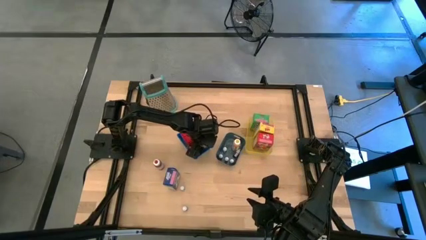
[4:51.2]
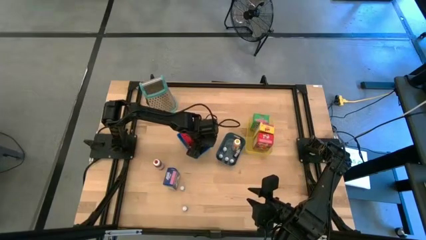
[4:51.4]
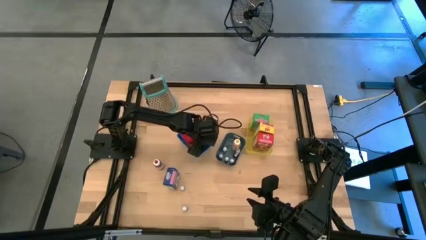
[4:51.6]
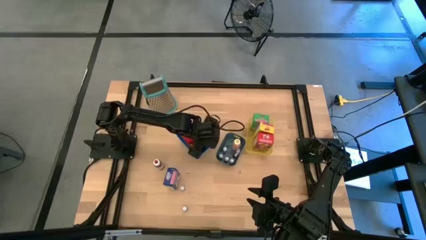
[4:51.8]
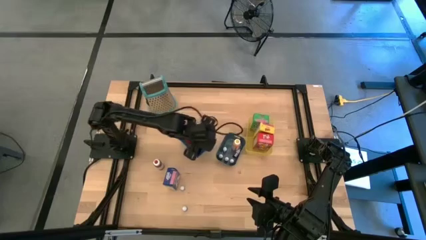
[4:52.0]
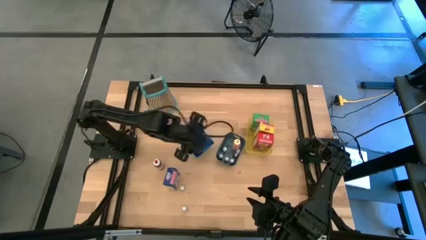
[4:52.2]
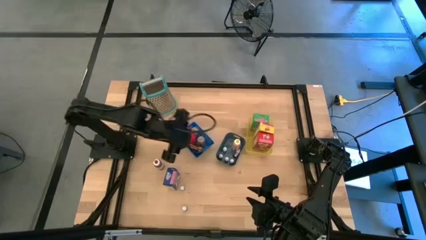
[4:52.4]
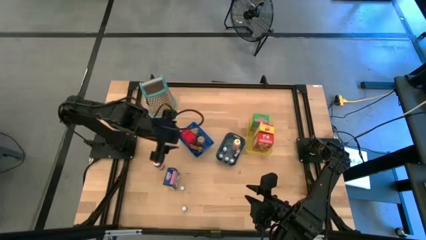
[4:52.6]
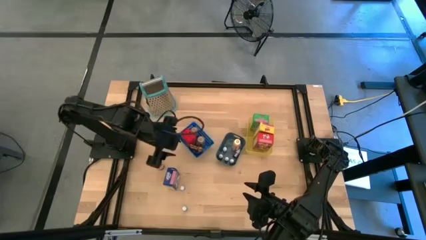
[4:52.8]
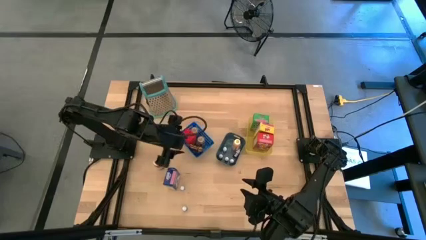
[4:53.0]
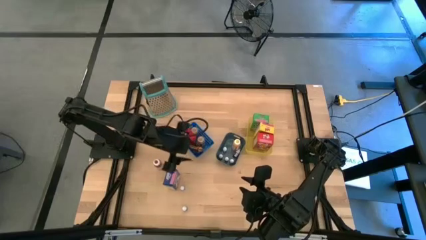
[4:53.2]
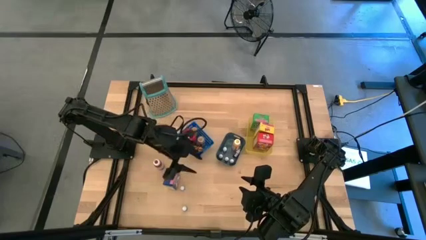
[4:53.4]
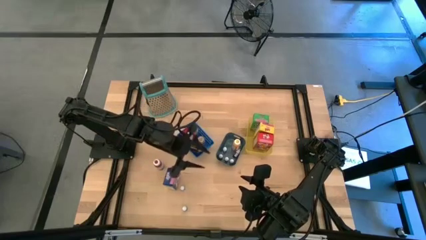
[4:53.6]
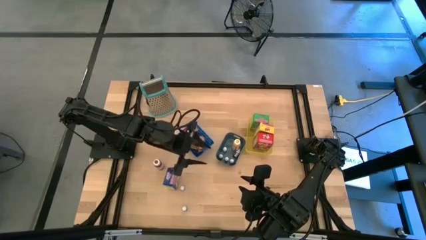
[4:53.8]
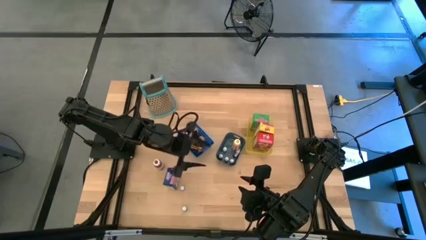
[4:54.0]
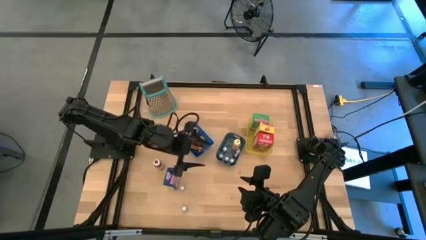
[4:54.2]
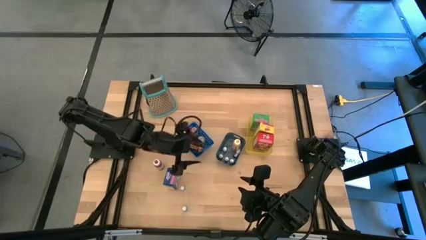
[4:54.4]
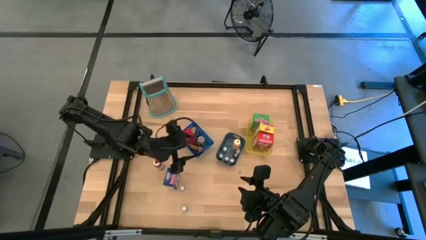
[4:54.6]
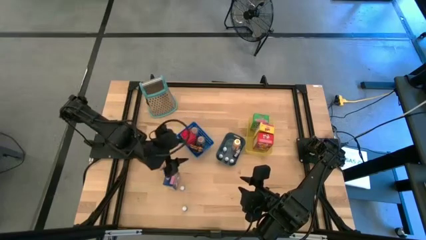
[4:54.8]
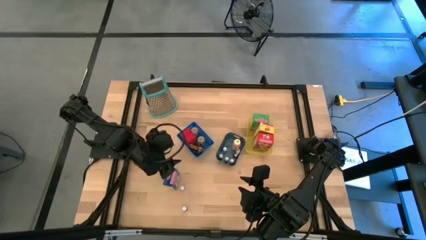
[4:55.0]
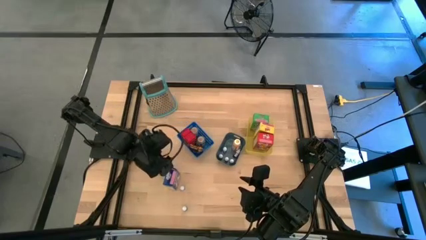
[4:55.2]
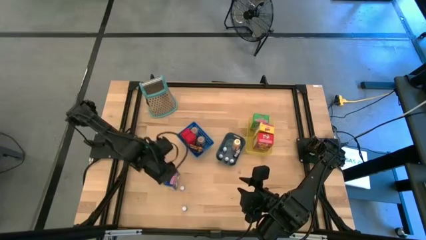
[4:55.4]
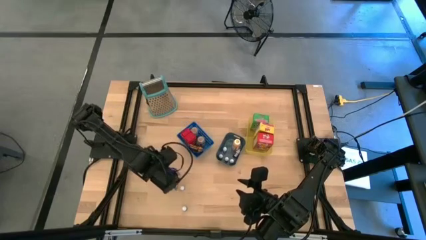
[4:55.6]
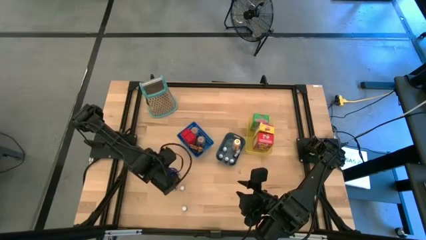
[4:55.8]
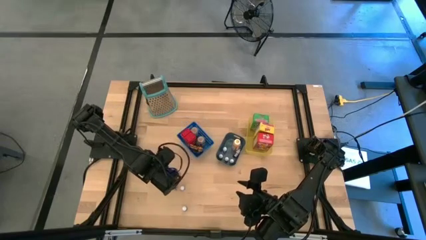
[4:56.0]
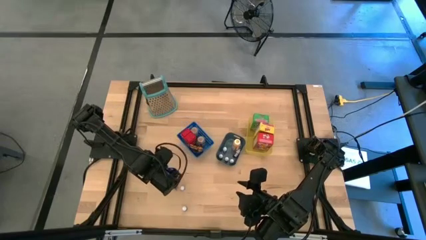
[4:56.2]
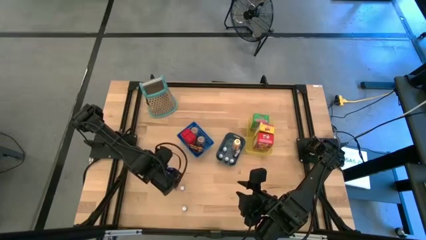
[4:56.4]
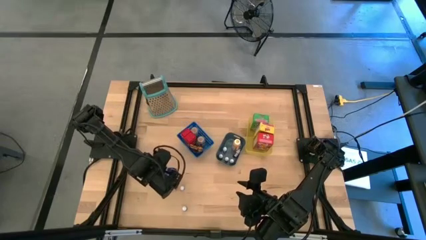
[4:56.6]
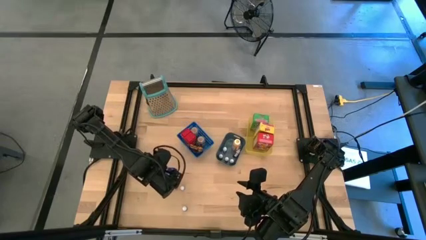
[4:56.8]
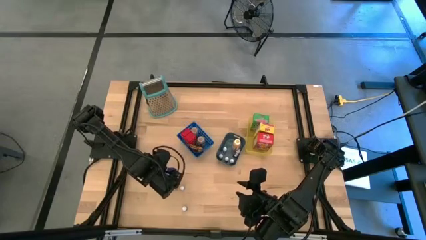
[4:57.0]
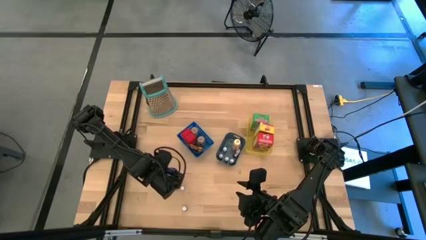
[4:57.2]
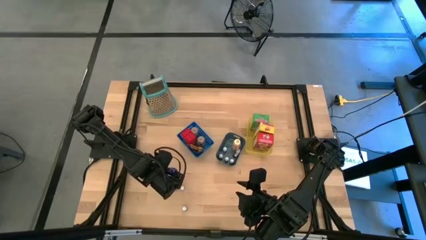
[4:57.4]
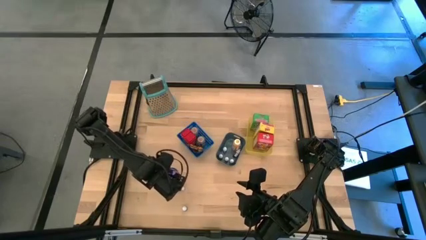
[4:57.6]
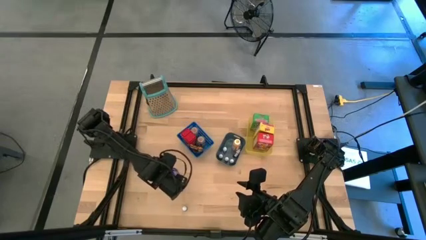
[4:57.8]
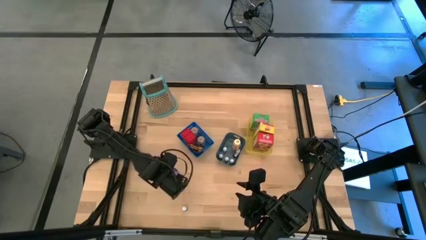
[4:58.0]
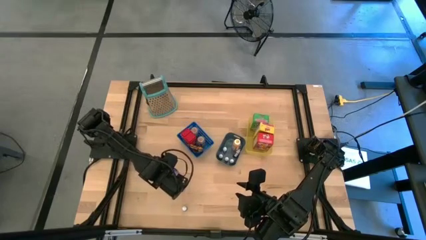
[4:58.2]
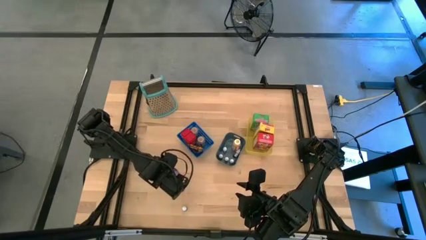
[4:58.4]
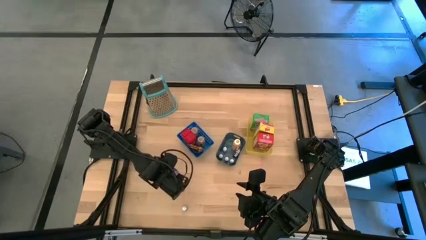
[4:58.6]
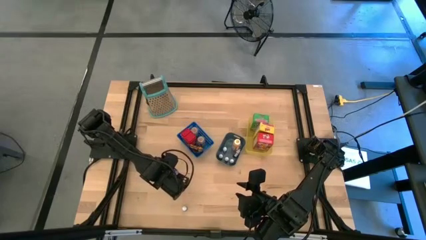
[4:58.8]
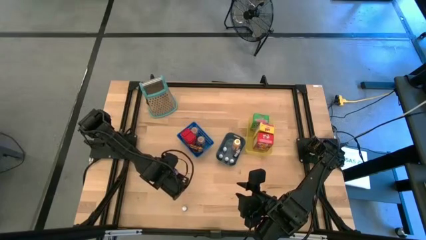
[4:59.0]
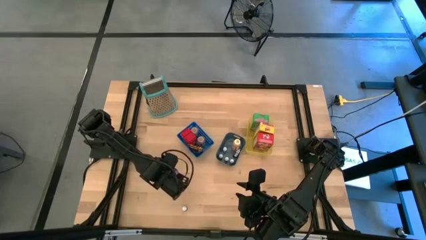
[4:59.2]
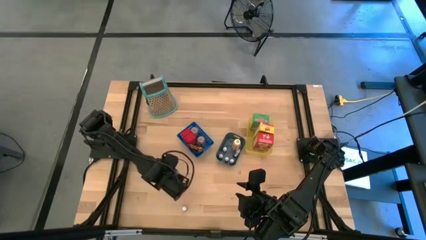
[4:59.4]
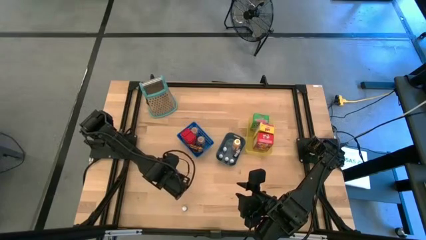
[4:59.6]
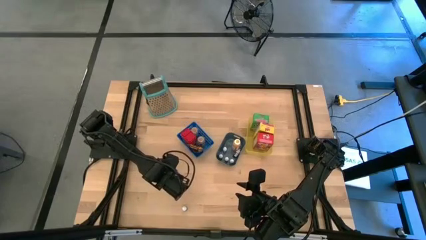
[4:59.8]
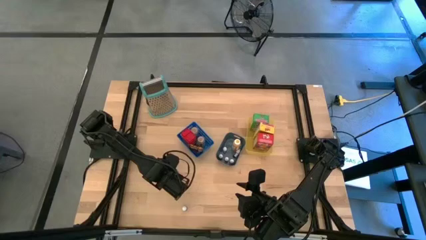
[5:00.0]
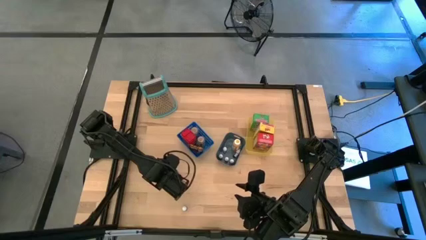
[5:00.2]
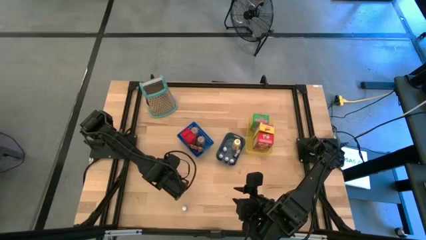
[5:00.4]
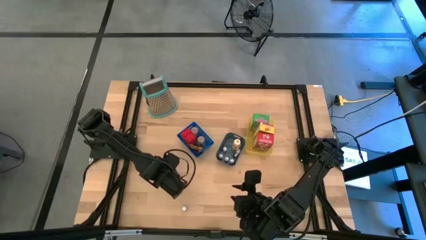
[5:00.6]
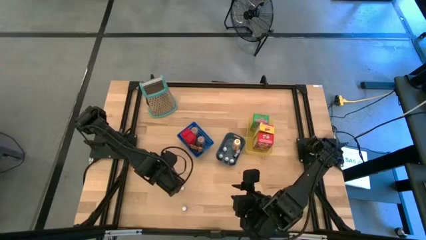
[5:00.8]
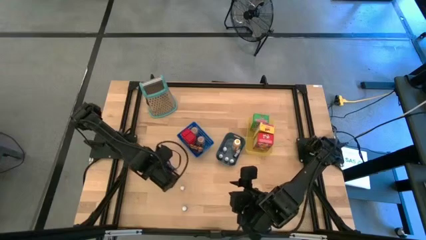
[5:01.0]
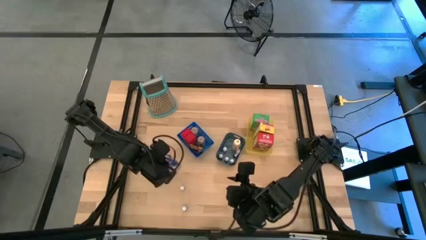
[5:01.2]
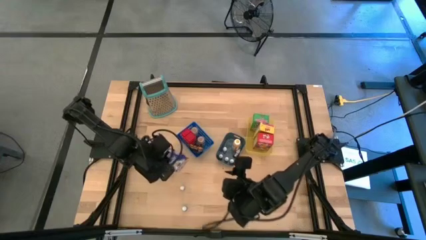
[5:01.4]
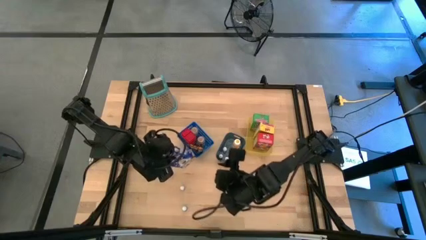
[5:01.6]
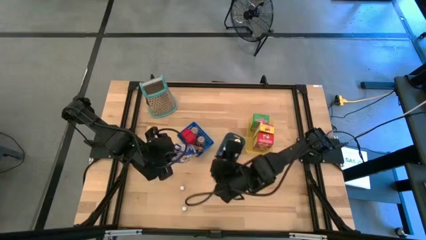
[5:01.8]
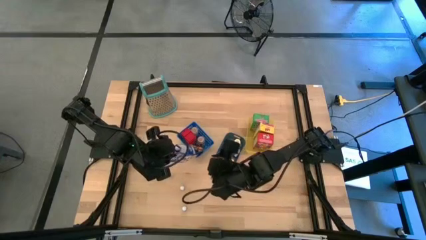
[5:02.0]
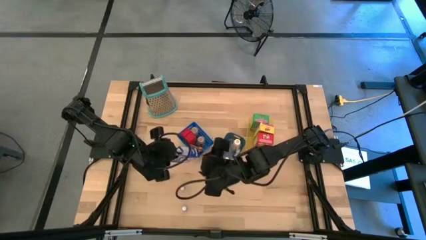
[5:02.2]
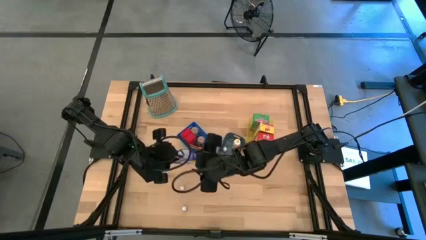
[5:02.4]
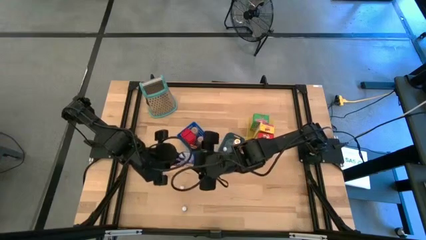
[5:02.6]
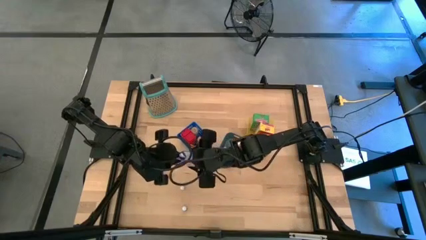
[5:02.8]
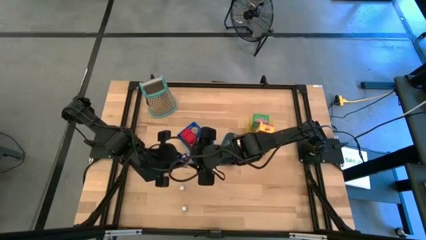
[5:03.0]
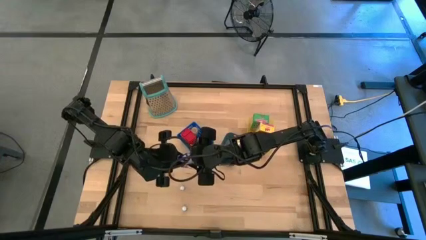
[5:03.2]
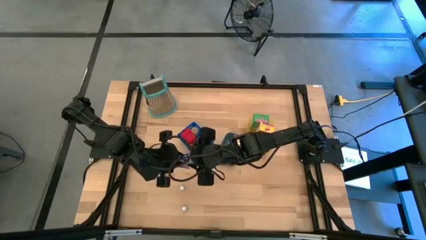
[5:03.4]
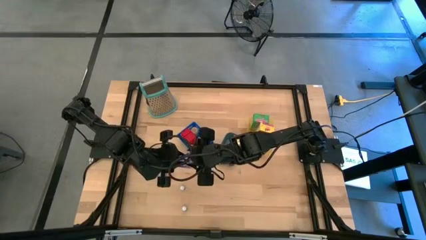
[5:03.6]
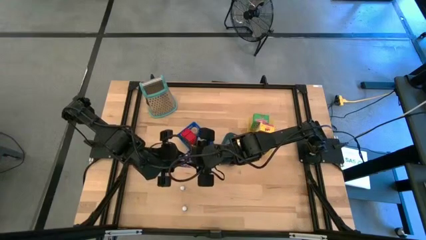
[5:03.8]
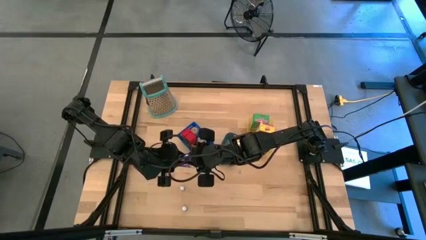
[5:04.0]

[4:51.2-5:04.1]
Task: Pick & Place Kitchen Items
Put the blue cereal box into the yellow bin
